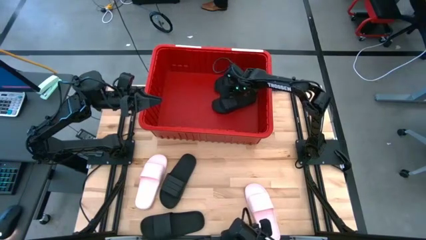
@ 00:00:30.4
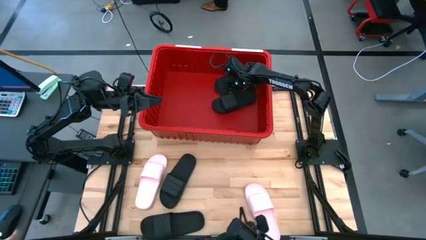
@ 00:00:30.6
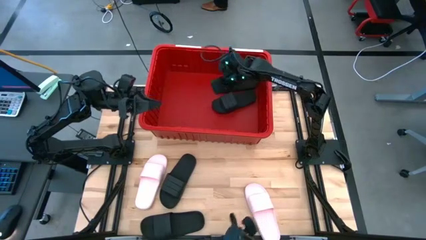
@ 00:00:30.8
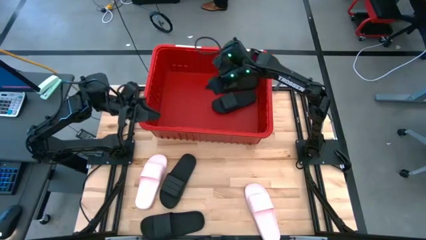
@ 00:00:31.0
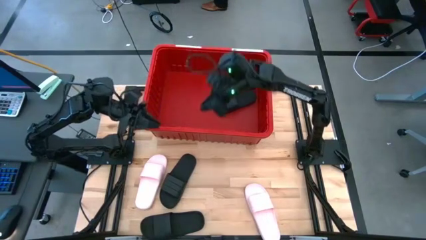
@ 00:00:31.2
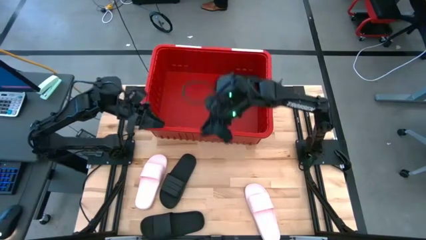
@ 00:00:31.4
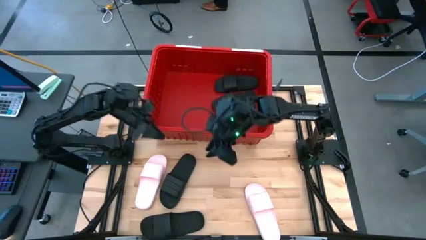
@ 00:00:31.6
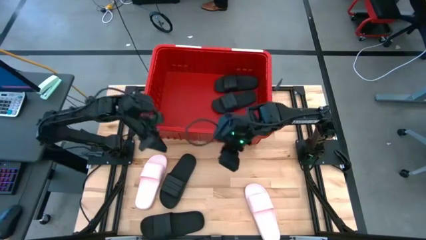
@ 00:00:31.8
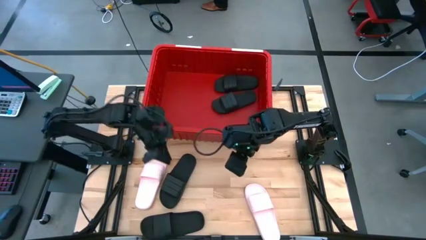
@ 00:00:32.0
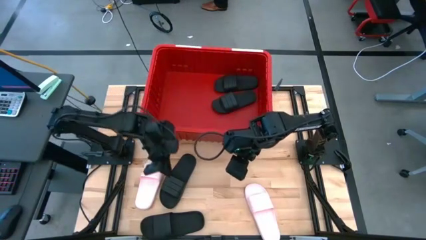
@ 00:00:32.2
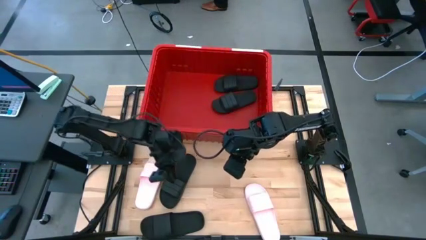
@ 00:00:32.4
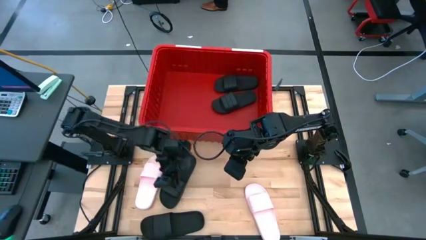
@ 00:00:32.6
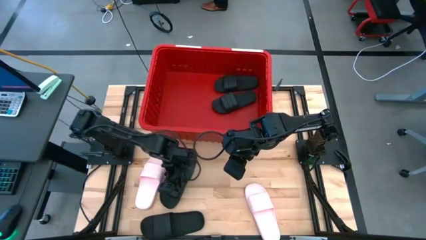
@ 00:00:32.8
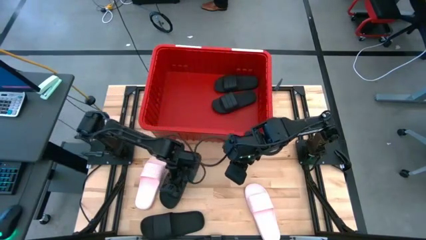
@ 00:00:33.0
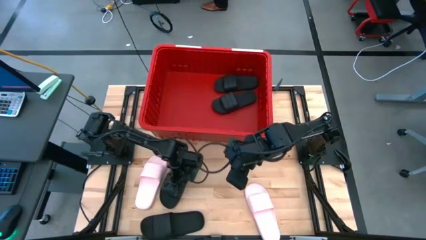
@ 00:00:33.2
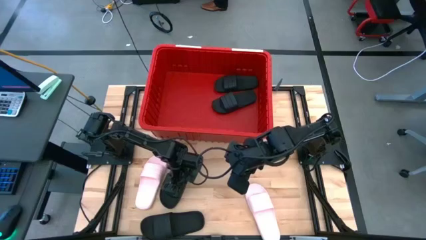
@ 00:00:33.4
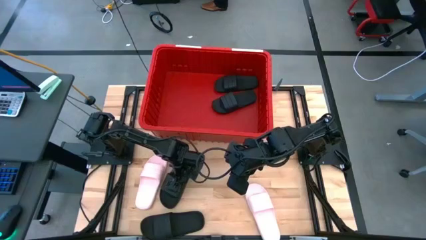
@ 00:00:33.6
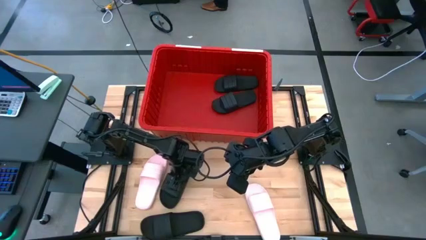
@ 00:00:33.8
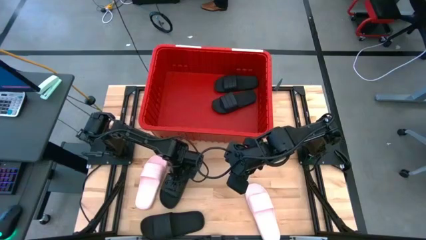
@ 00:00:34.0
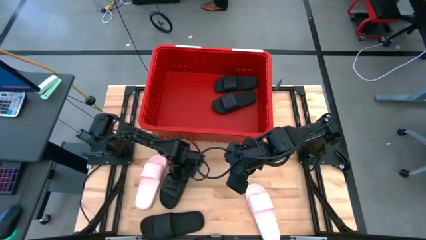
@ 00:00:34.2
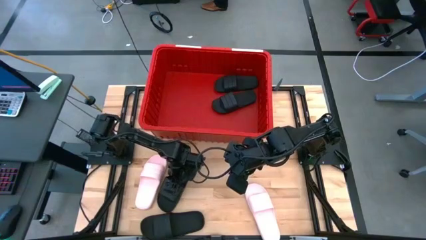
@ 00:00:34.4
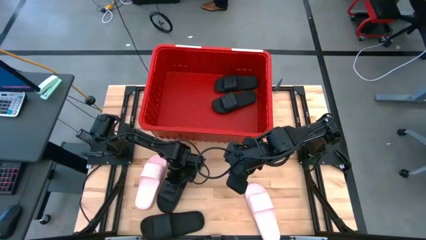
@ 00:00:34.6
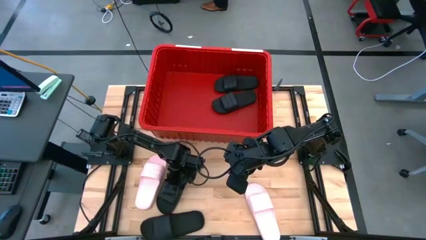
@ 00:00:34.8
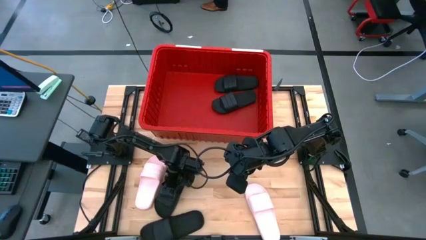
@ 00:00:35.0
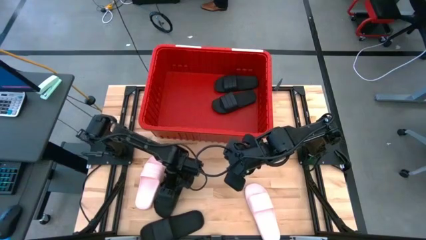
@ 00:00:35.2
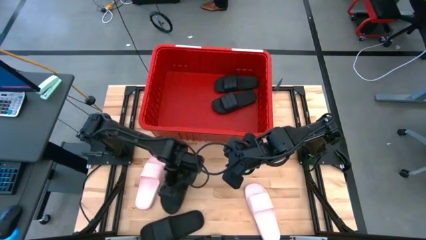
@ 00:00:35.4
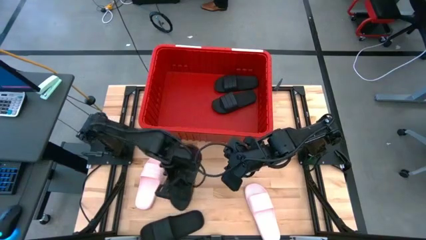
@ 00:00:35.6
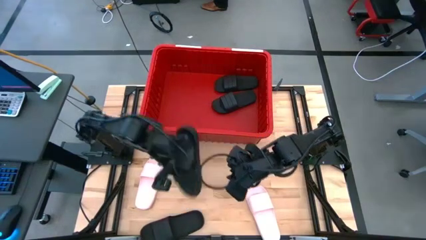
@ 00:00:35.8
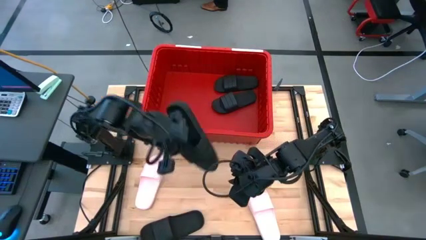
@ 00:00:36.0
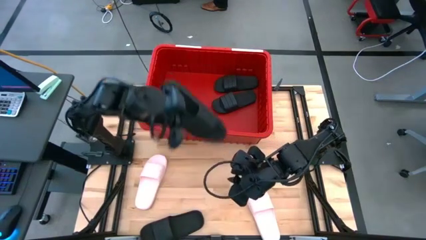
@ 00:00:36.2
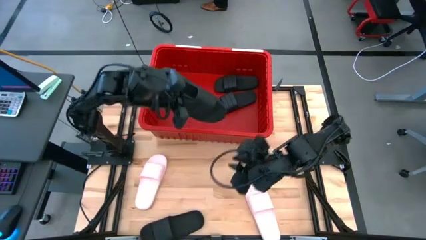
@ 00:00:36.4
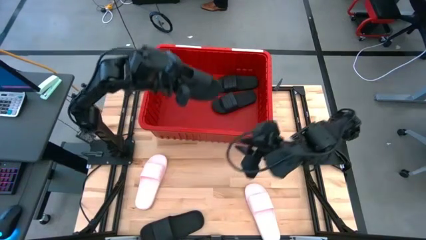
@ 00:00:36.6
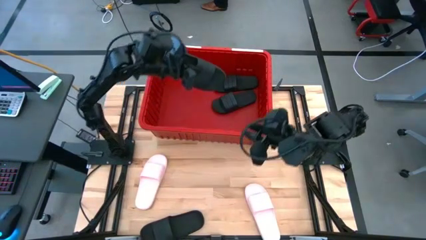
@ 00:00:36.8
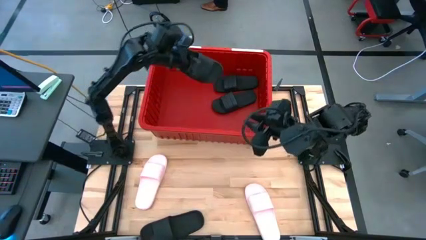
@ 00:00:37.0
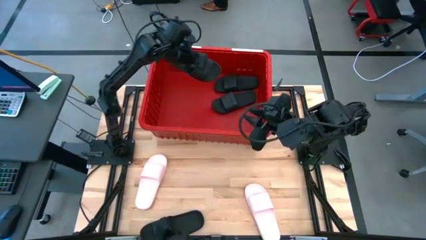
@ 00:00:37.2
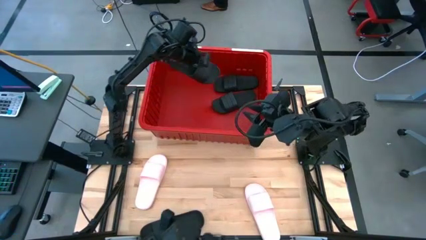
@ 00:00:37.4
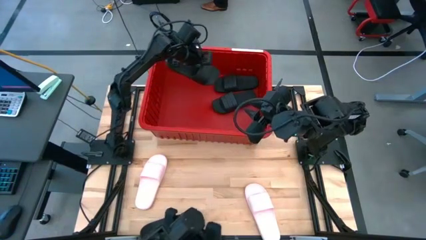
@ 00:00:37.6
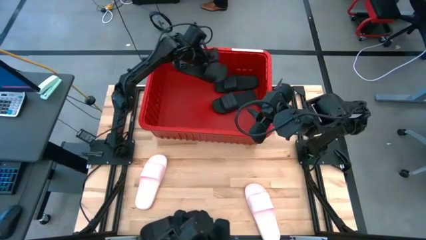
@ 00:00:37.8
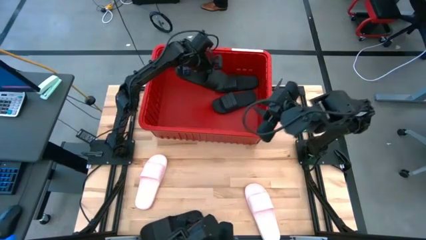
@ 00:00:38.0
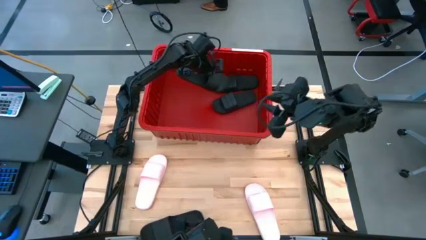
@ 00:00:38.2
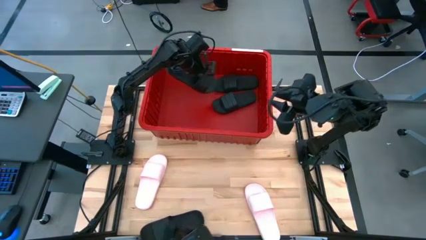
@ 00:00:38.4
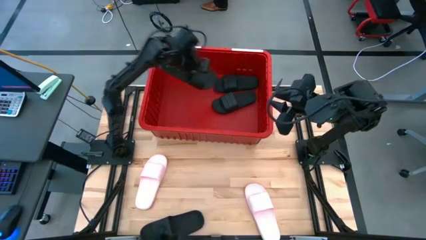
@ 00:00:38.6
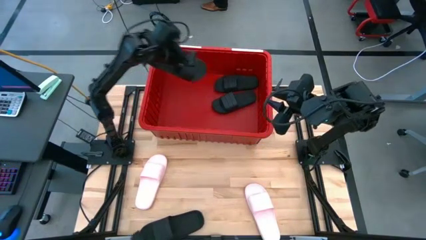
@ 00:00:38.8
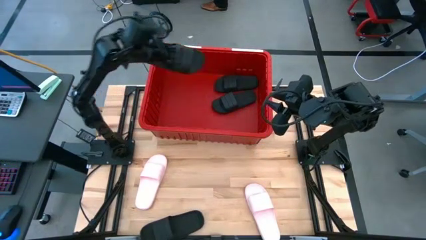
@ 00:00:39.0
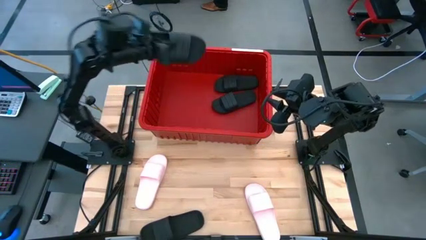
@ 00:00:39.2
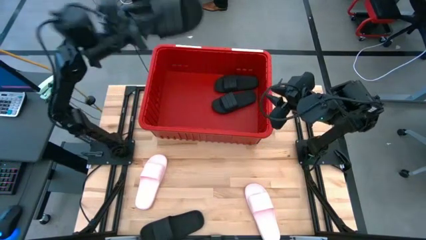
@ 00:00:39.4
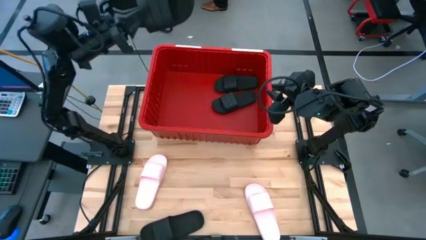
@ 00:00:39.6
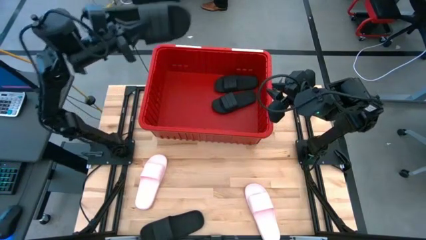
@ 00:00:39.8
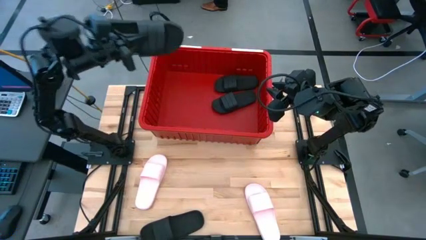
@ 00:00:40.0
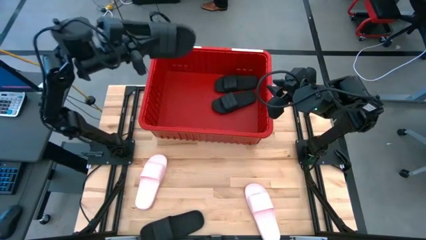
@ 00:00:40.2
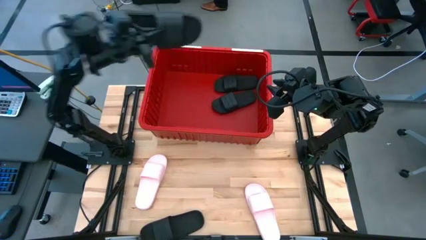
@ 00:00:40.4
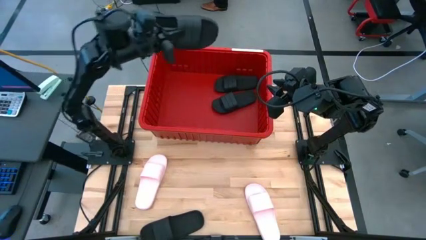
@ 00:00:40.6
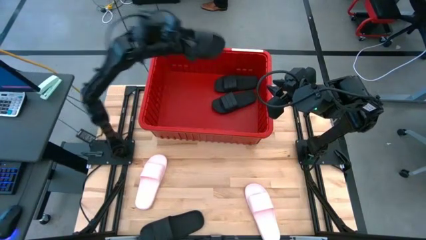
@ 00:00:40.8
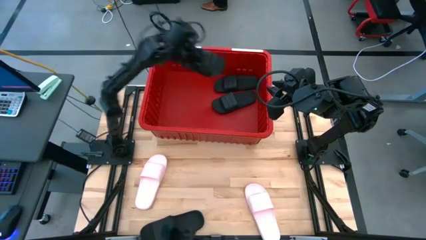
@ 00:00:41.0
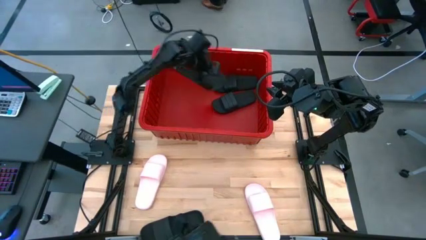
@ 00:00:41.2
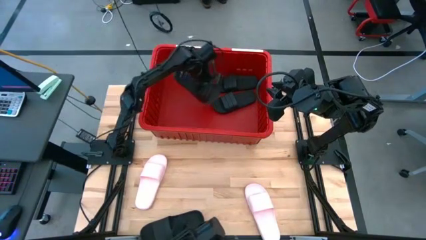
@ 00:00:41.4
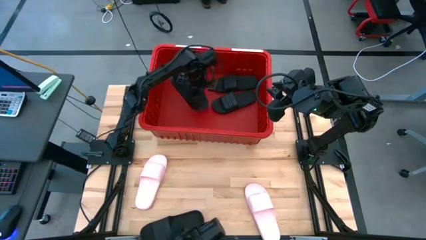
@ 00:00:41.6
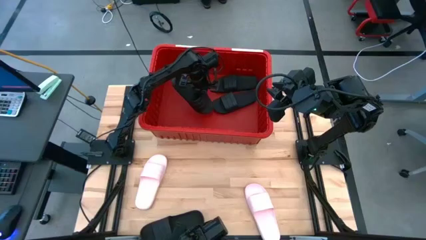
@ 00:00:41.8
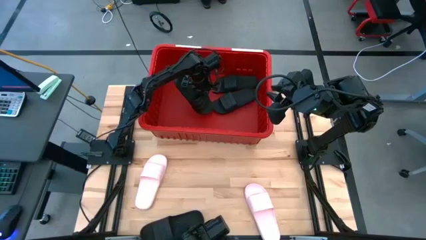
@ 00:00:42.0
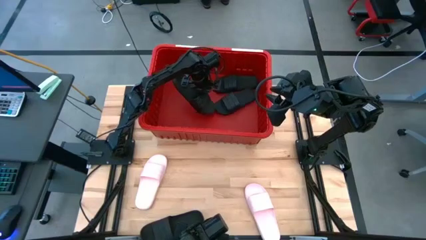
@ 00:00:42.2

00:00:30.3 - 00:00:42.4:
Task: Pick and place slides into bin
Put the black slide into the red bin
